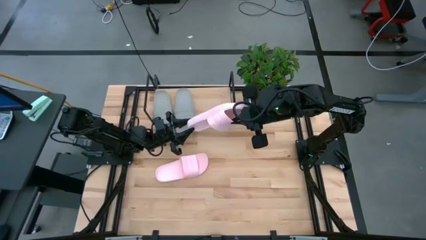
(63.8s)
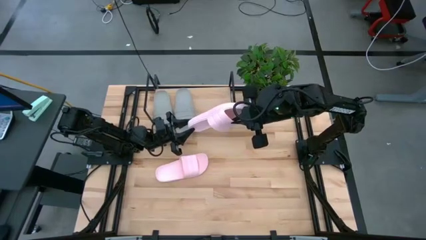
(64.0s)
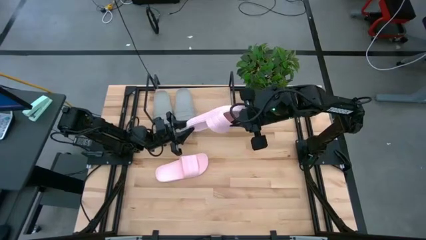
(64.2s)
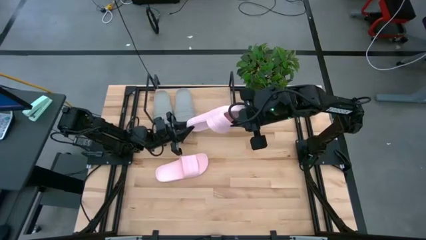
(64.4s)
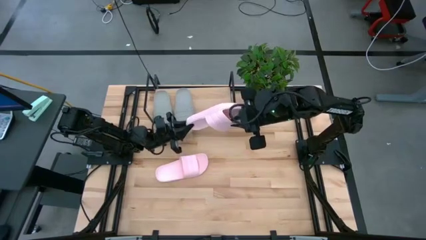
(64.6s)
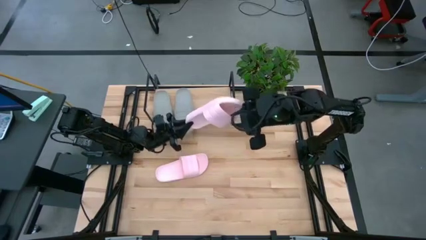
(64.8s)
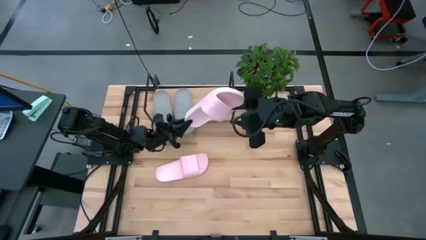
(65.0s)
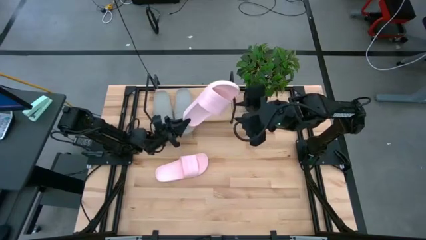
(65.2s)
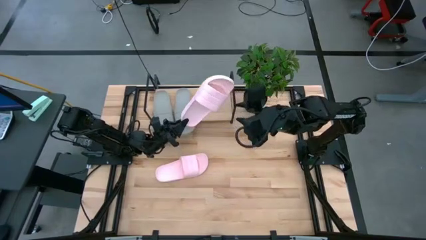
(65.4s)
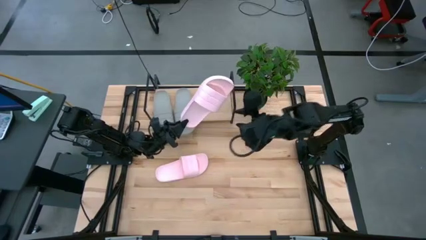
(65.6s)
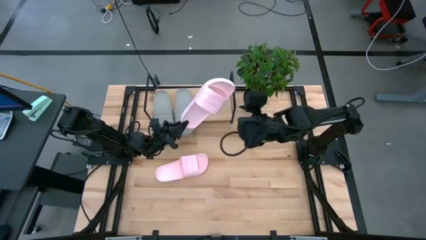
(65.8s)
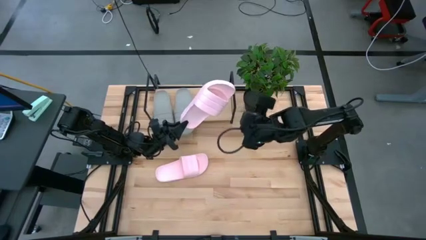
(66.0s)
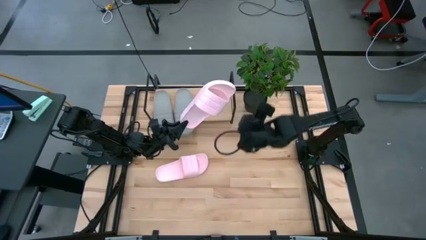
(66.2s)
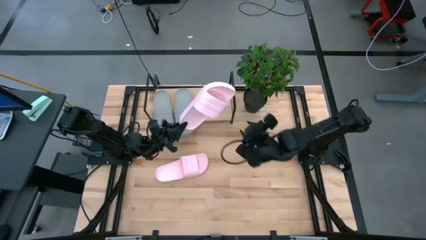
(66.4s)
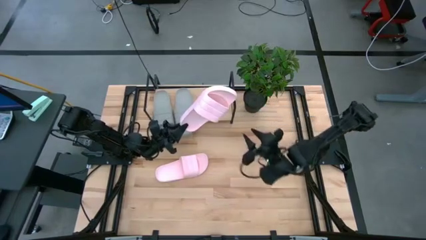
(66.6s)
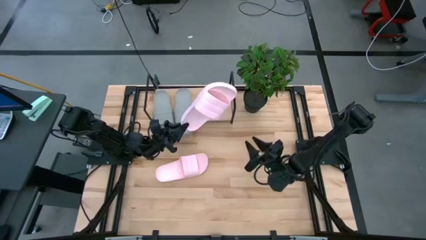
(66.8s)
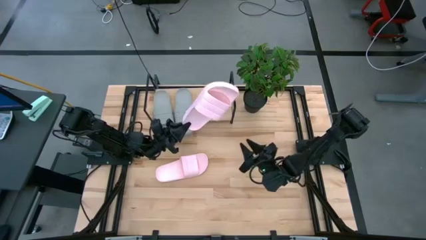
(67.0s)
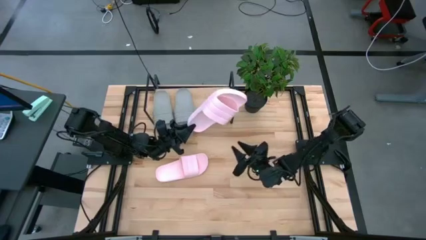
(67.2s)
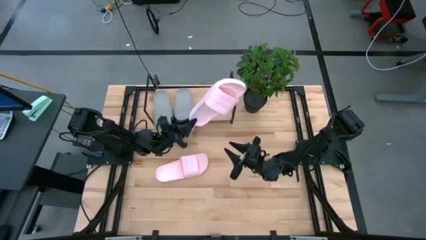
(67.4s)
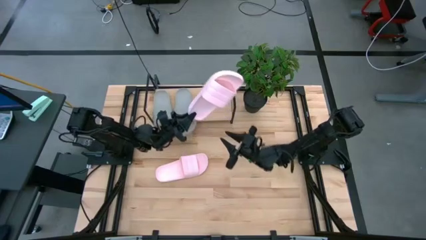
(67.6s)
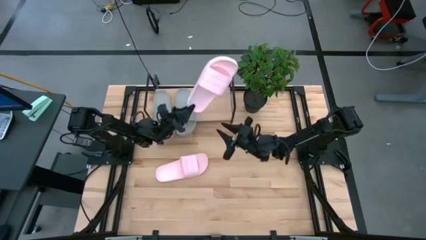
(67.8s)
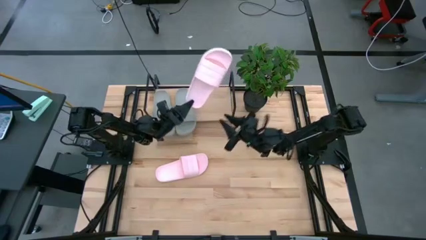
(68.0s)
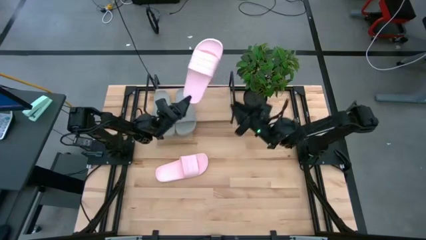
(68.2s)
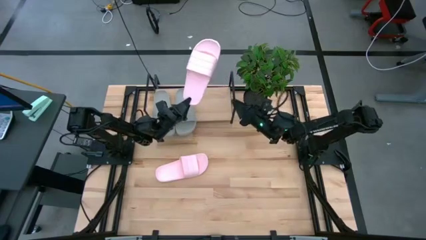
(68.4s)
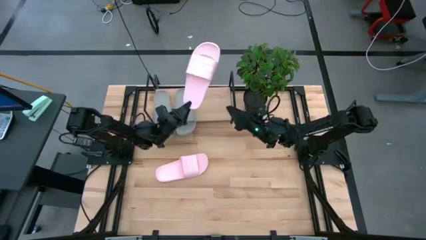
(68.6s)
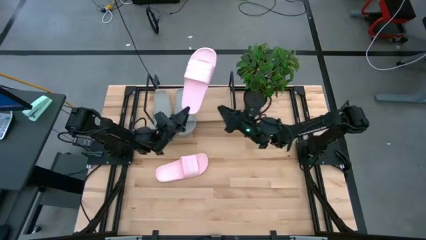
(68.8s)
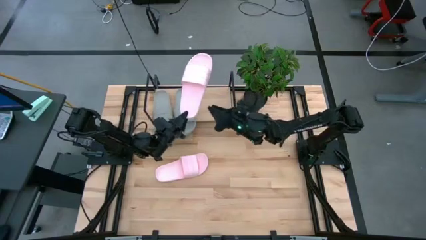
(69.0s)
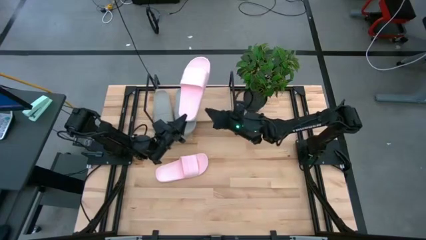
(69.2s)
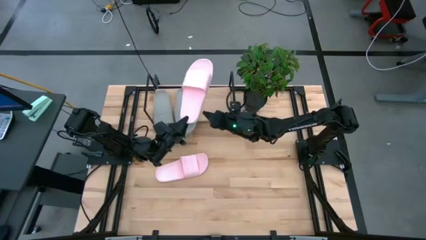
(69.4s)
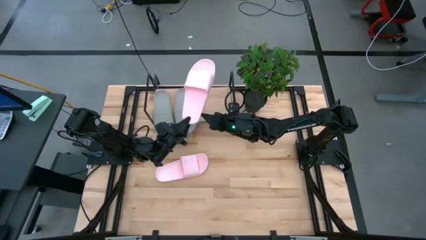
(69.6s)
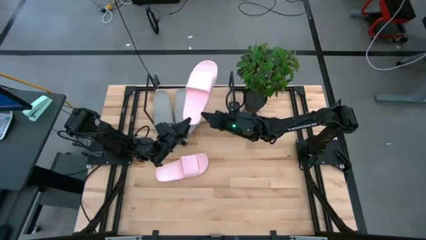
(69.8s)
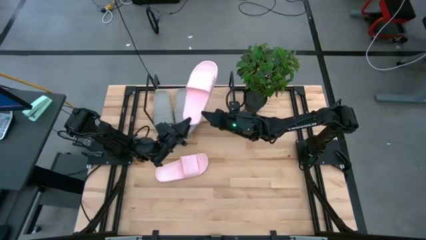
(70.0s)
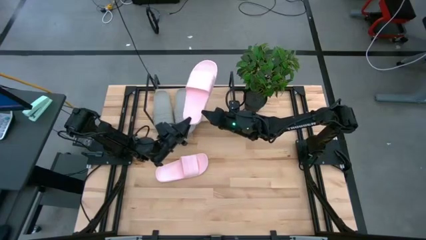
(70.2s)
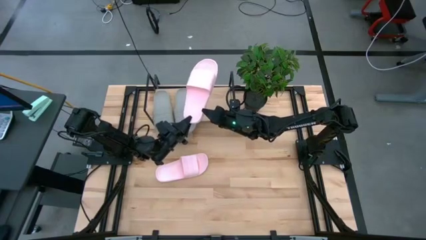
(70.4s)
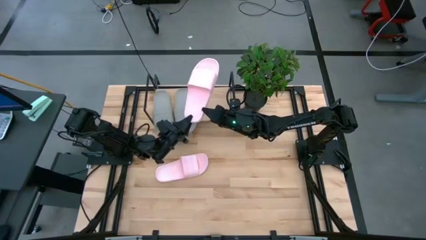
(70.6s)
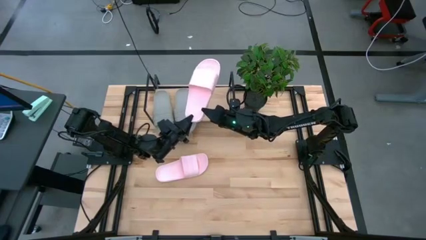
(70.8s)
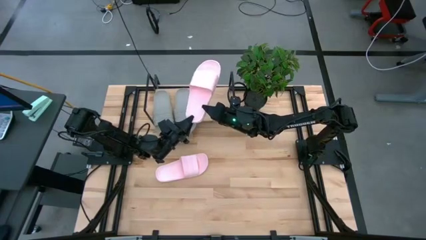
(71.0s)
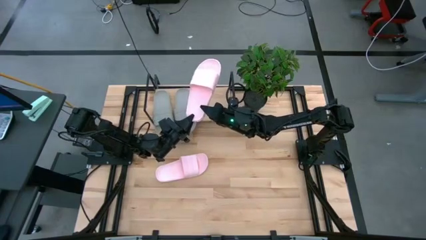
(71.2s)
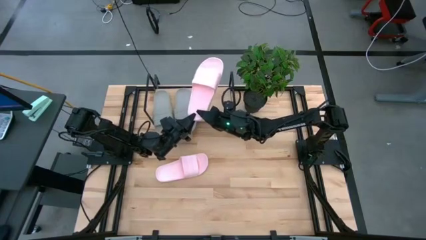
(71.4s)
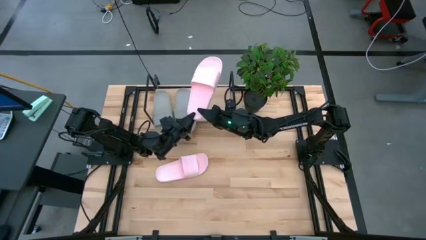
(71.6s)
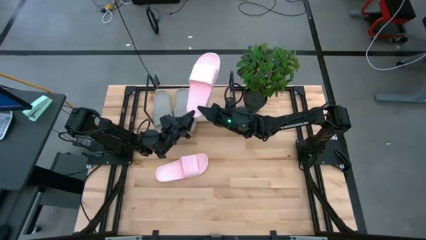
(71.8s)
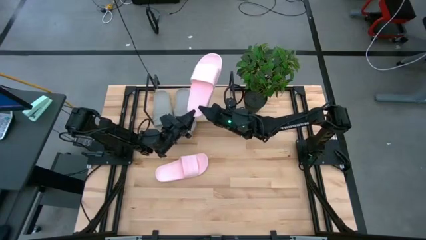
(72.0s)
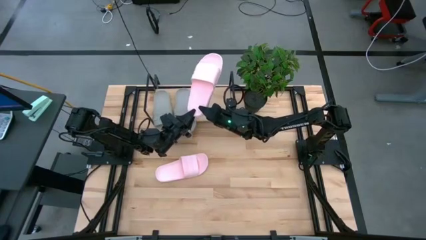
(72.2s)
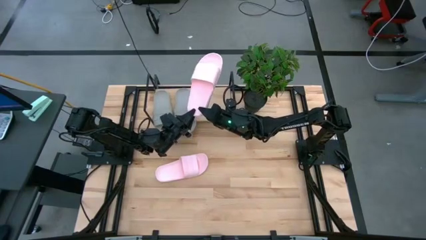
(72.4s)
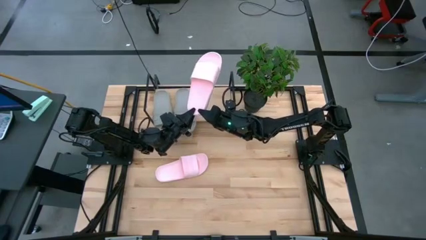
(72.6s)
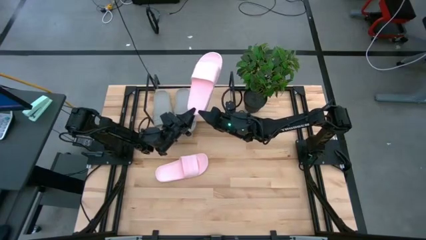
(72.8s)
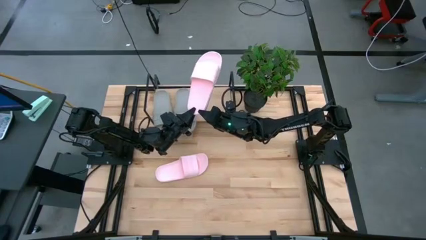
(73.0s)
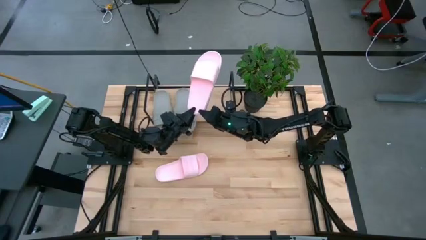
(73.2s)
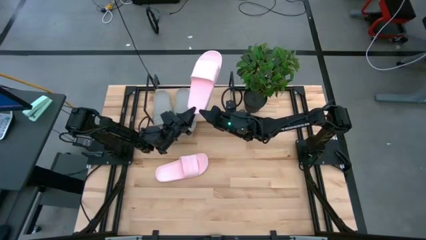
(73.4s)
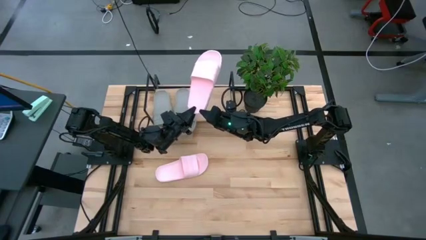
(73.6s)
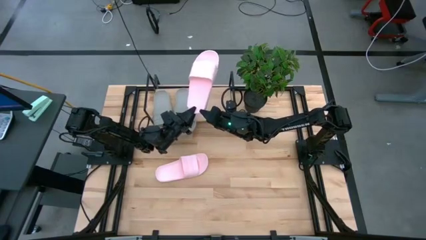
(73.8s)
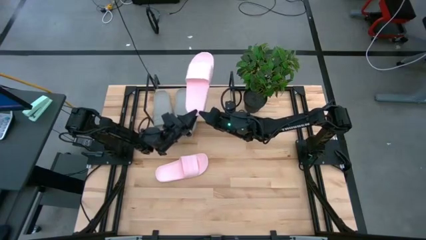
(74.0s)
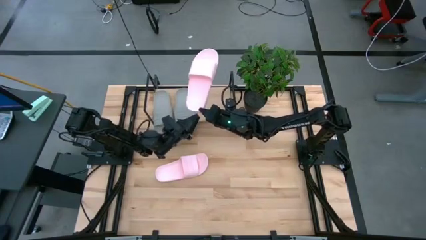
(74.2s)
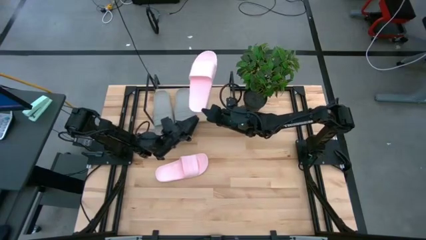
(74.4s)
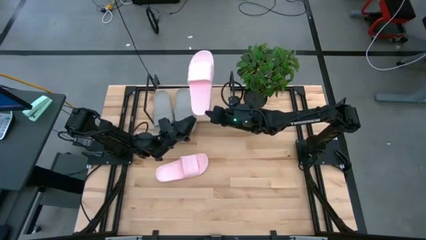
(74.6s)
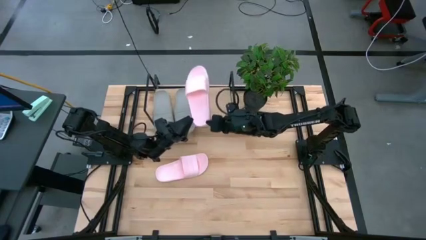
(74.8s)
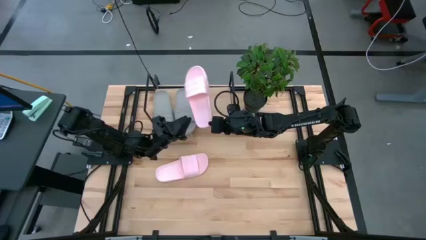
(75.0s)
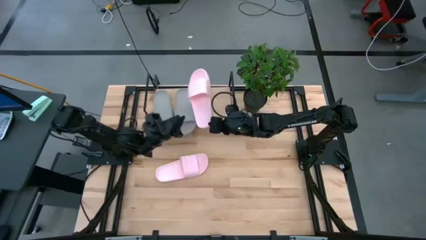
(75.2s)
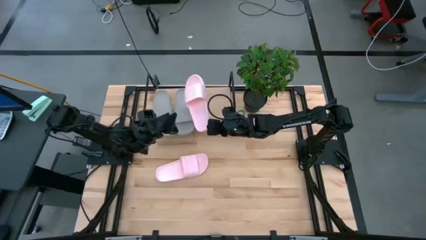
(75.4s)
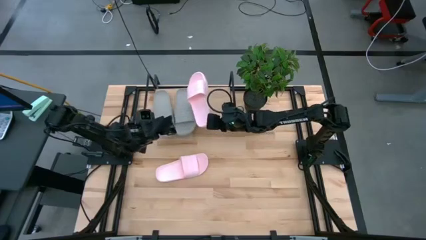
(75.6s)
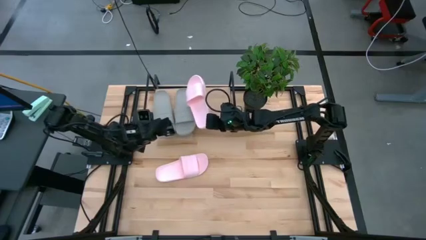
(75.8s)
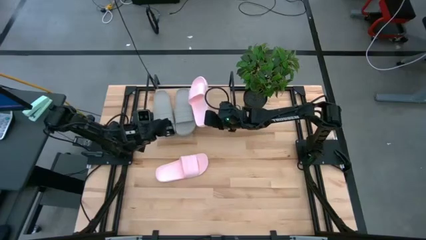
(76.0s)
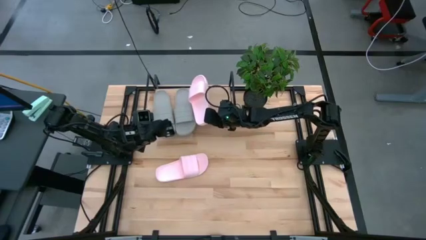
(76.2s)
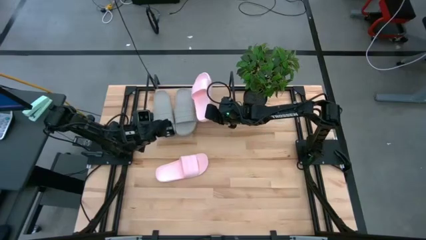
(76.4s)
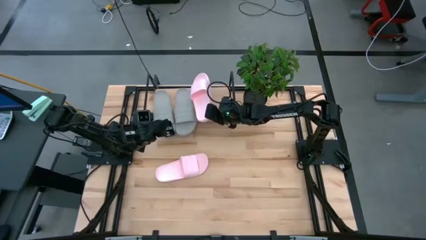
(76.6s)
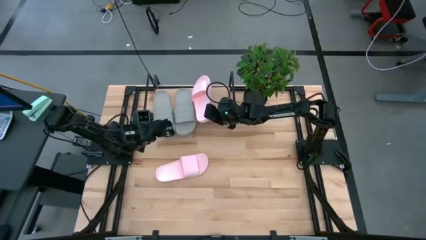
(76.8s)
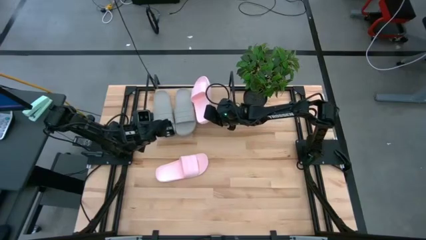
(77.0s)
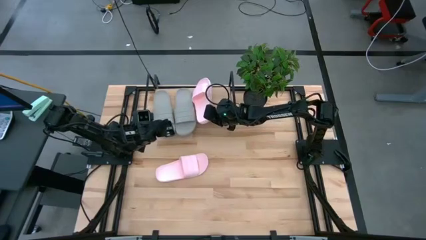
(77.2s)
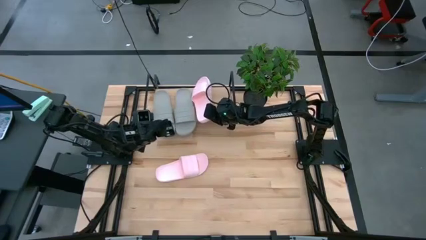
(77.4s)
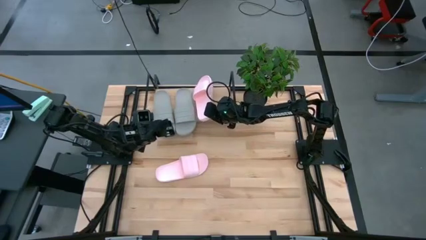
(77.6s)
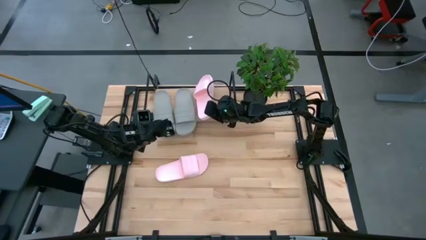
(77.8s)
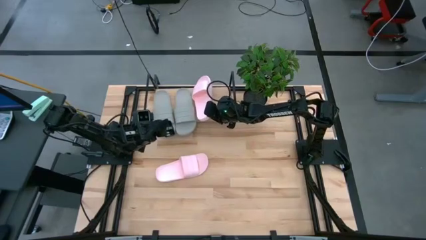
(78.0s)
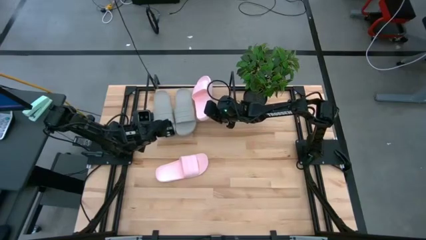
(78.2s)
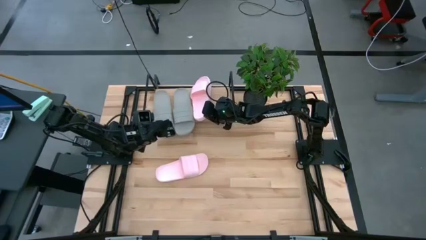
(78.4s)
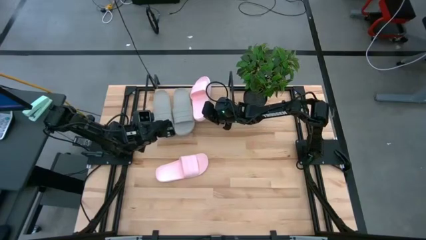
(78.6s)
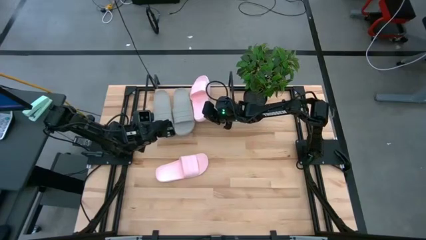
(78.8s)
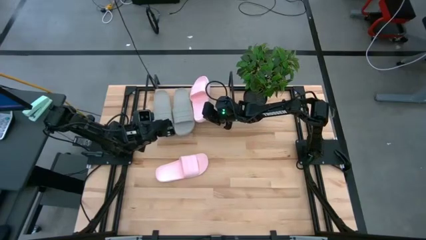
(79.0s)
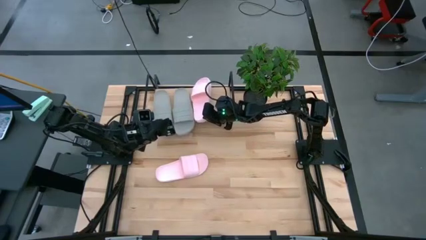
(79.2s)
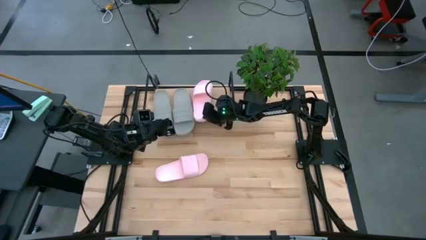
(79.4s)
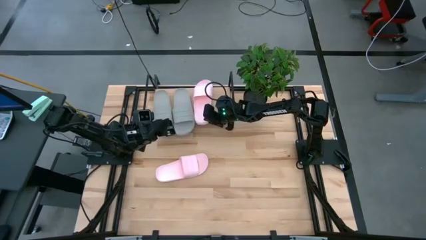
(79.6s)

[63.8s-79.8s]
Task: Pick and place slides into the shelf
Put the right pink slide on the shelf
